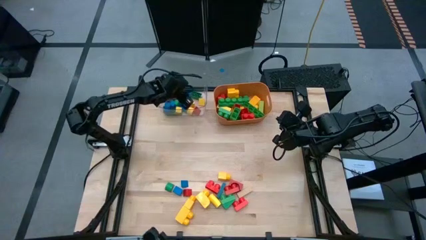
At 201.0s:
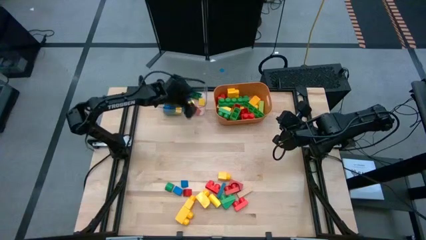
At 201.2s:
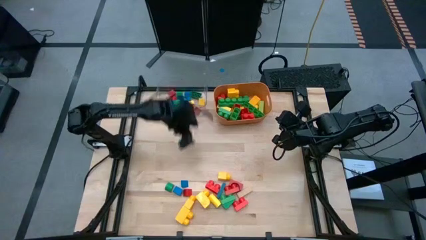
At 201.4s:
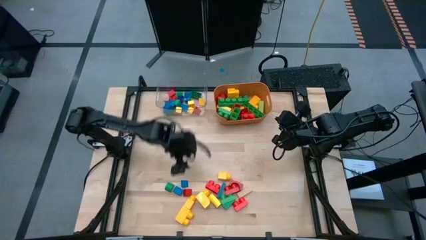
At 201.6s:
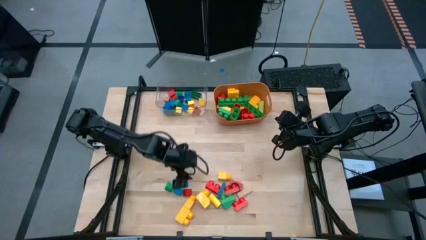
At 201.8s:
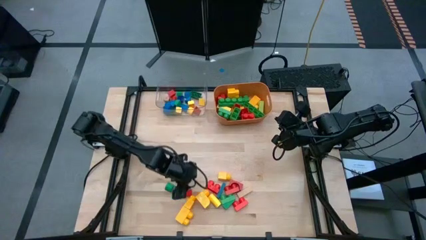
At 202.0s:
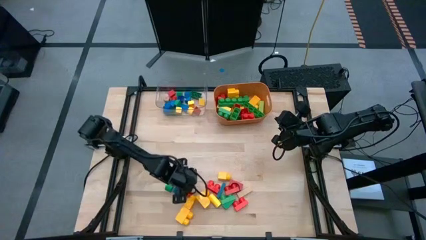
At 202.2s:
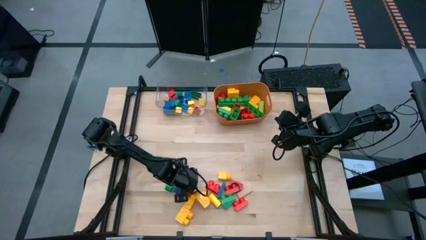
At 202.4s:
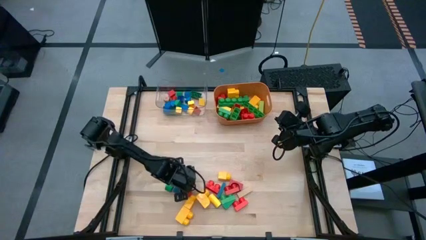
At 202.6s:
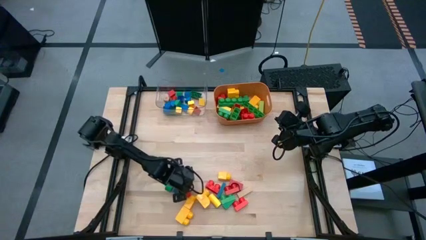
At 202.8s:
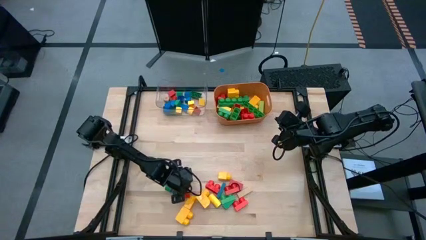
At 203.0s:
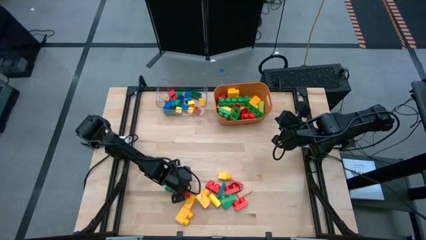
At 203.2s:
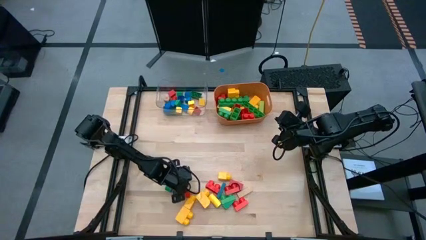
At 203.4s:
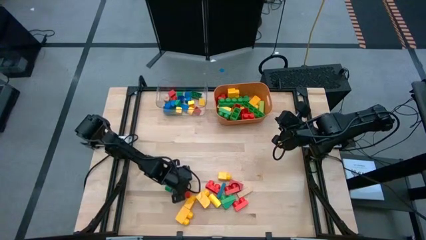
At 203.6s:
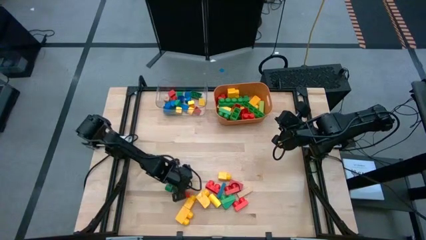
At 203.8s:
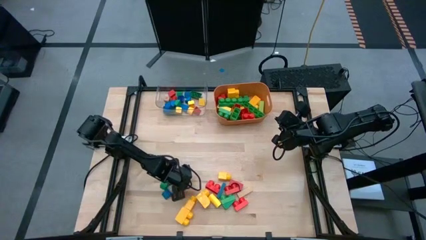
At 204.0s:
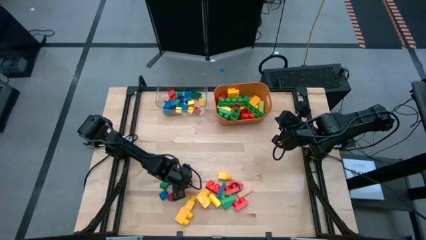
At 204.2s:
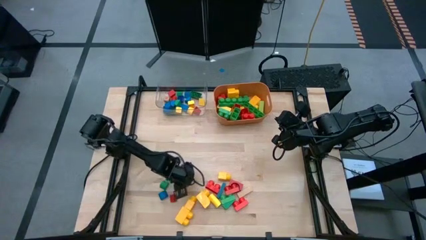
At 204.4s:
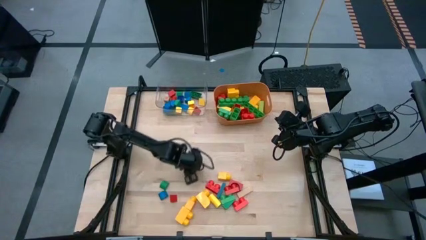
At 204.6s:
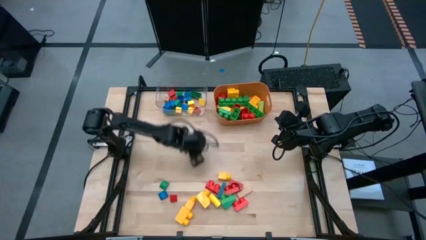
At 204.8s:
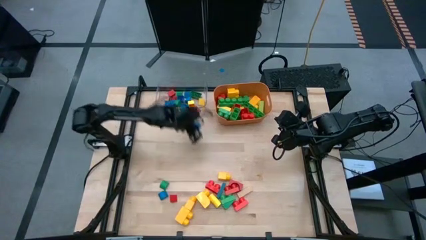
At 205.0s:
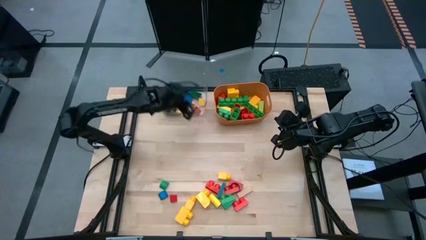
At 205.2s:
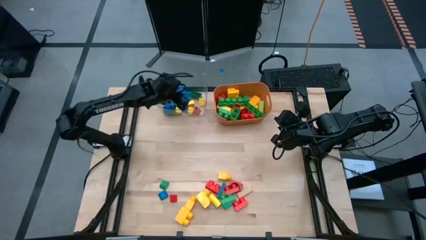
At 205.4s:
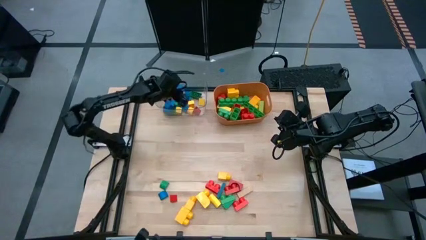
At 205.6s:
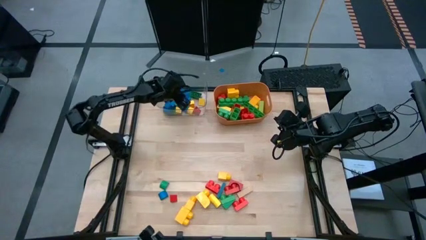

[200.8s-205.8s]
Task: Sort blocks by size
Put the small blue block into the transparent bin

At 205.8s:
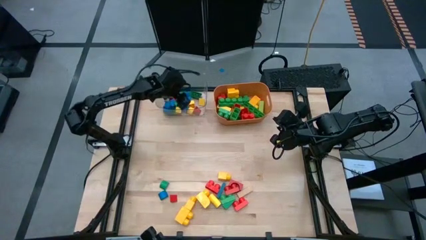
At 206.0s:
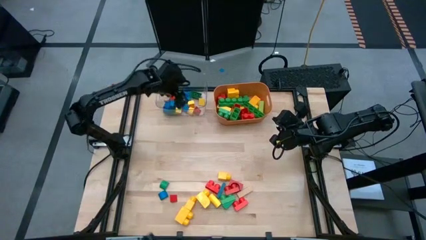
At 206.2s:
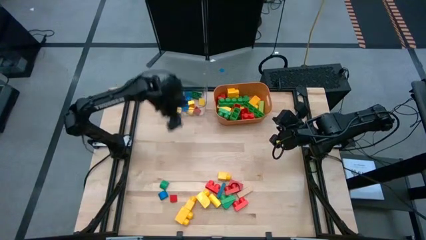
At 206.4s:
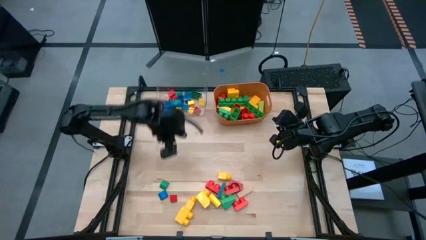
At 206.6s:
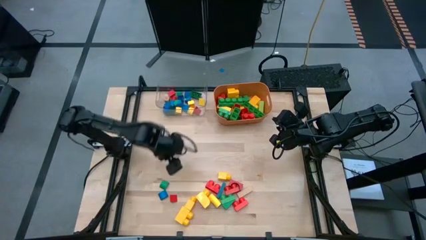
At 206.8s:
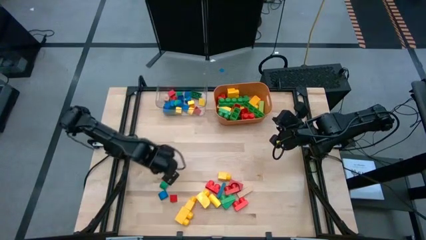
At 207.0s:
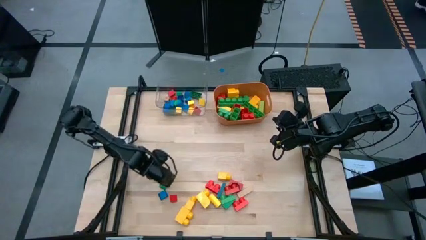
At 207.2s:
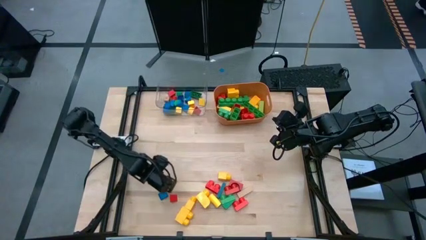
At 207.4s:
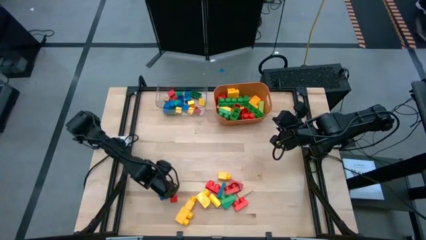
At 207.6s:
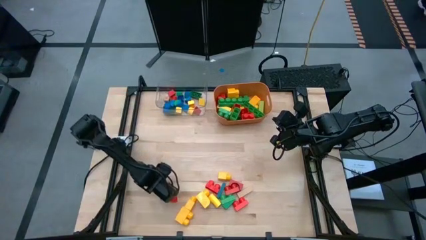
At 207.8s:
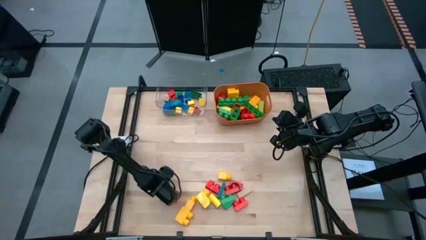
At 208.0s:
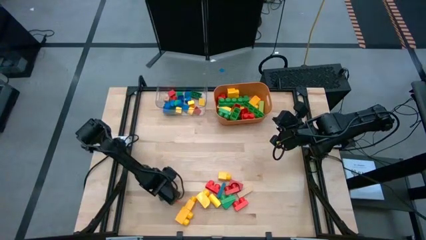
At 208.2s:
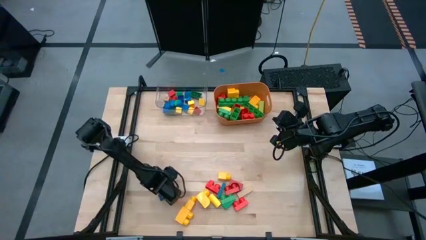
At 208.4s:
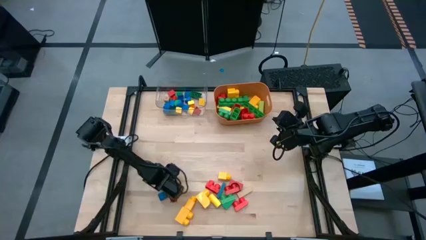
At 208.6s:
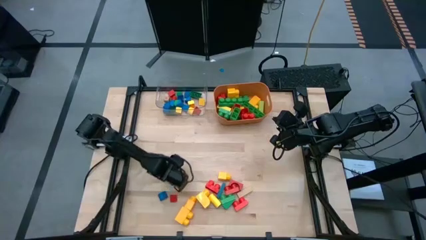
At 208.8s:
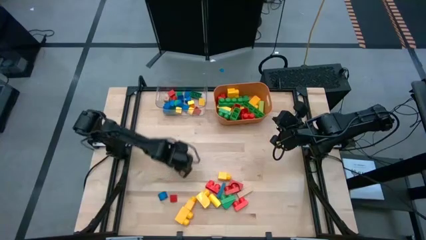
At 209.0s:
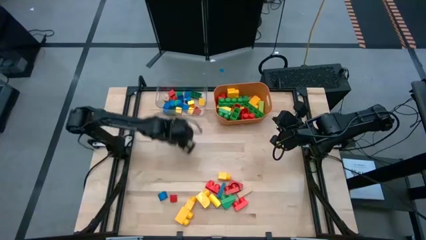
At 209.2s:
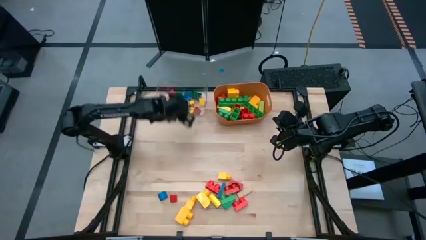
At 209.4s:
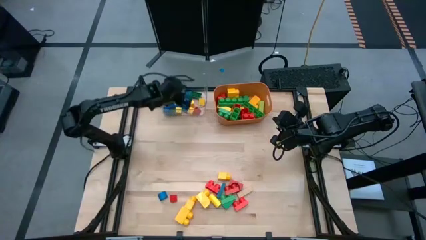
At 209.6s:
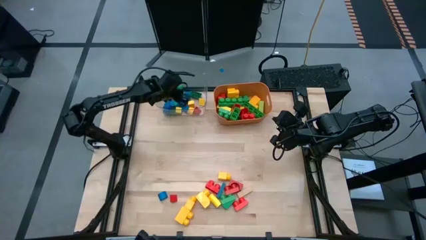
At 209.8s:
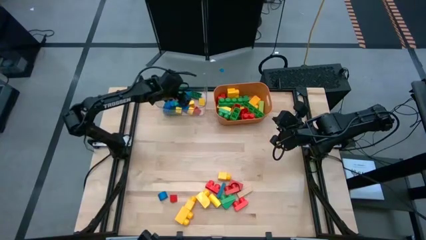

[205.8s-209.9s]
Put the small green block into the transparent bin

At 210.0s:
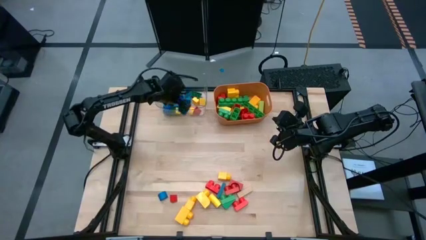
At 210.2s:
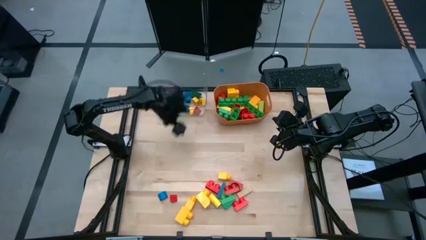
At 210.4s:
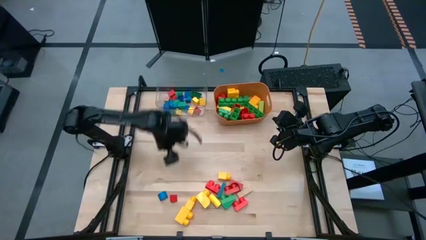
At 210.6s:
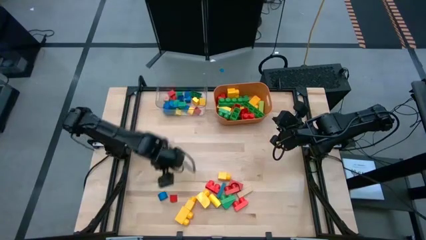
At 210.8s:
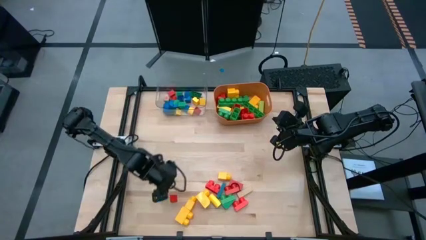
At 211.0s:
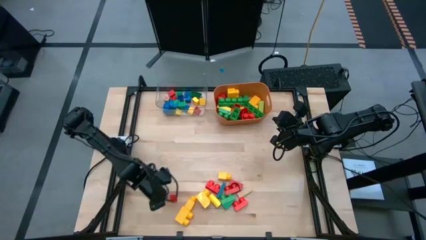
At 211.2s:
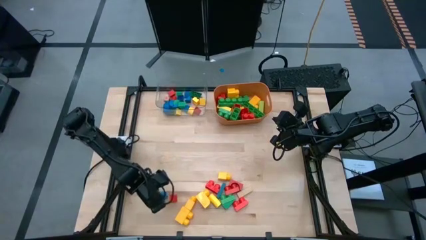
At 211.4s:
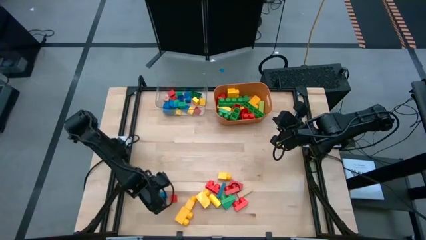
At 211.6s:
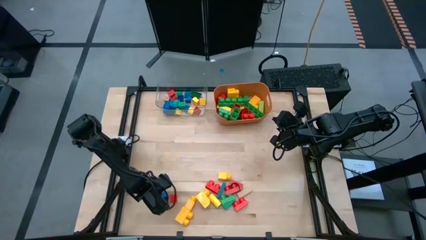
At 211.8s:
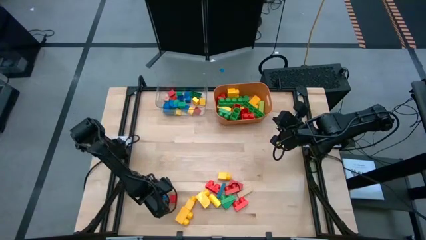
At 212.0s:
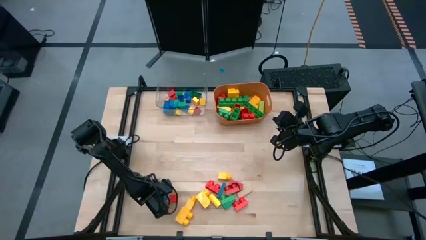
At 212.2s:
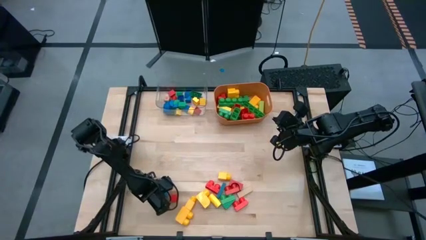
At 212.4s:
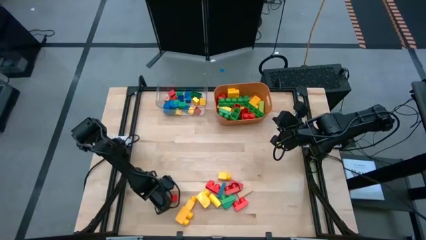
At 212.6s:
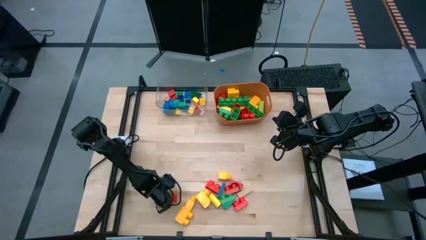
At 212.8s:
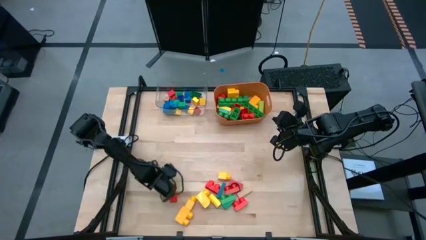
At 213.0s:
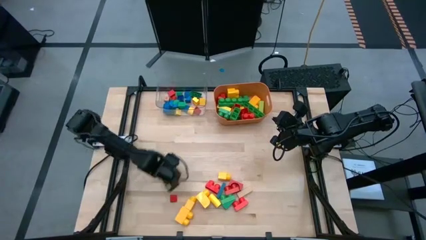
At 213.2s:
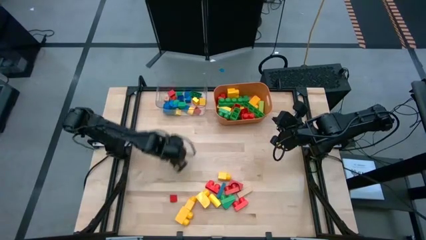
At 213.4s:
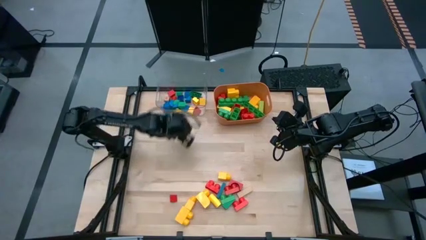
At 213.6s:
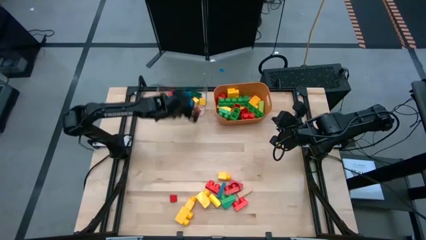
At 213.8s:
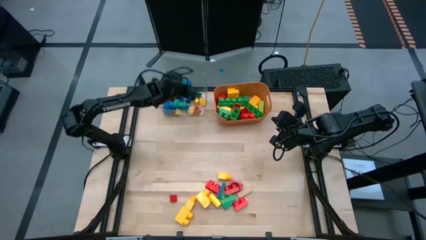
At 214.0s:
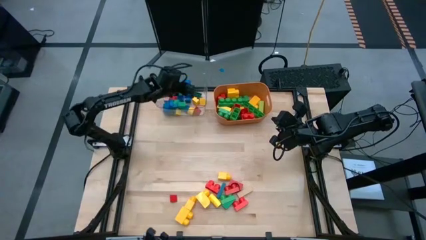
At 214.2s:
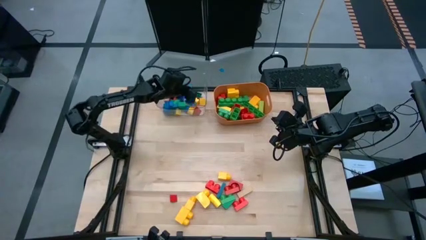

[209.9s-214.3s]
Put the small blue block into the transparent bin

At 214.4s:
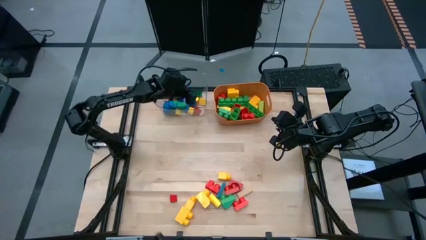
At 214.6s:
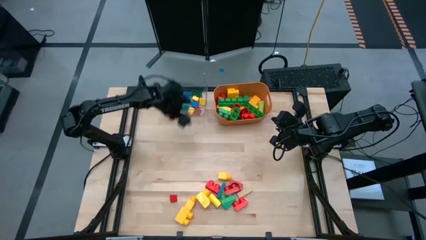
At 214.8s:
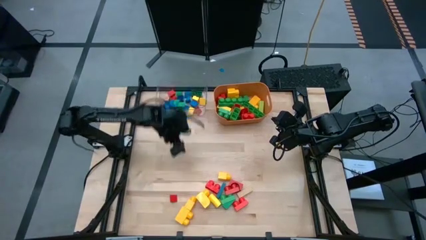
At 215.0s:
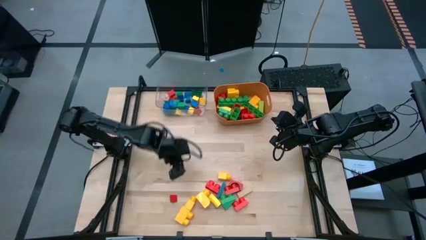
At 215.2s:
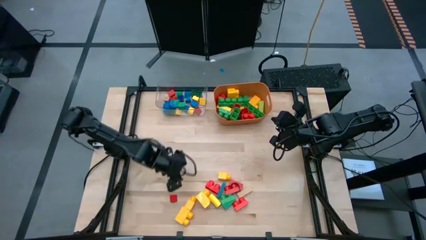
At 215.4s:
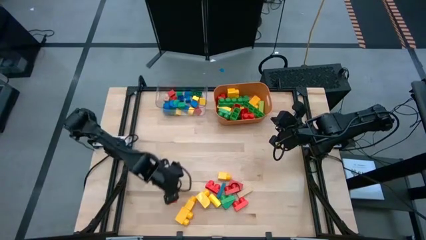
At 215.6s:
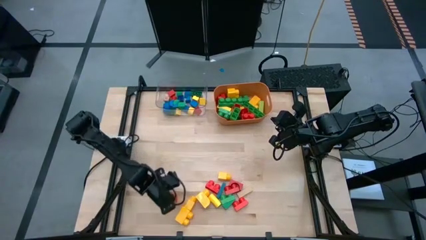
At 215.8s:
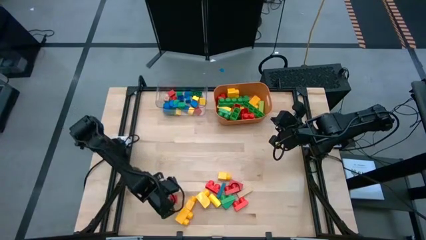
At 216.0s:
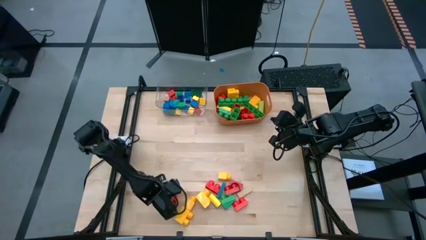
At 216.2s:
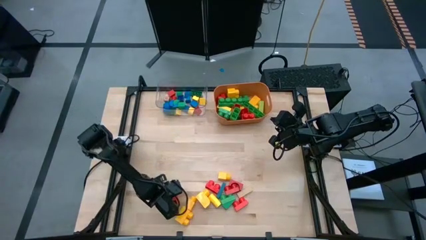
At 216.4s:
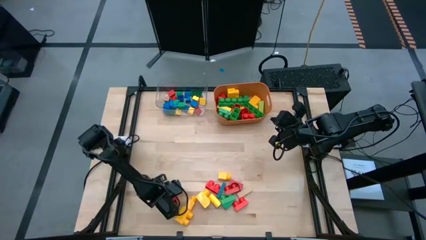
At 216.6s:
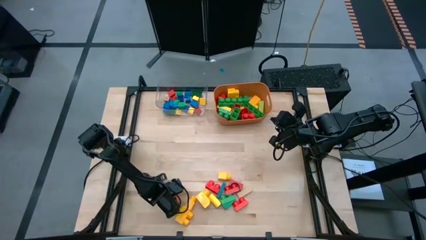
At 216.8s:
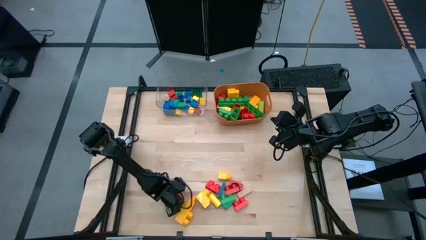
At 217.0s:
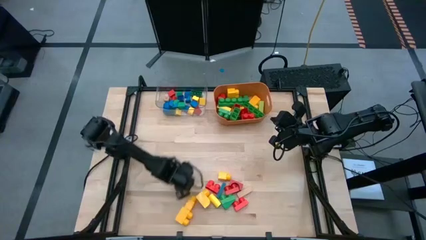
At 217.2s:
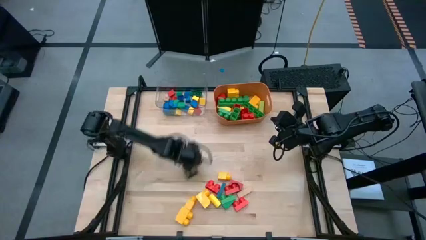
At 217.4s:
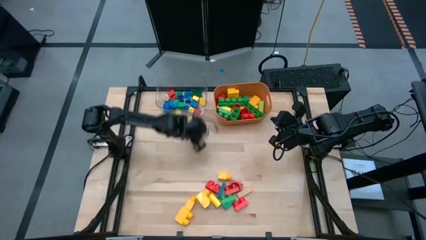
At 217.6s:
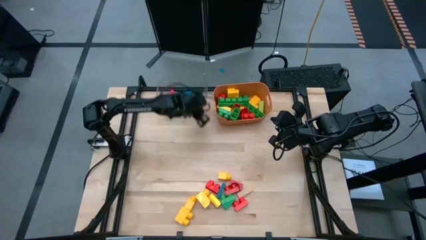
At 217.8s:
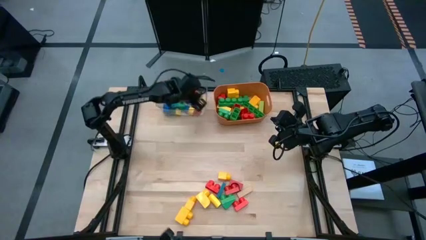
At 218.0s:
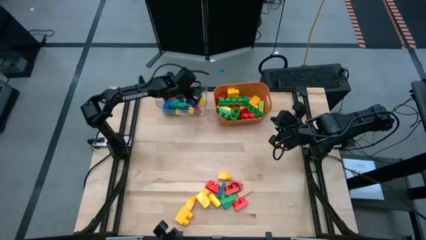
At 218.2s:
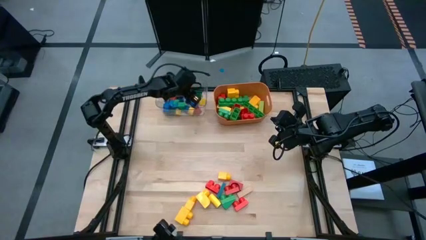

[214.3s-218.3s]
Put the small red block into the transparent bin
